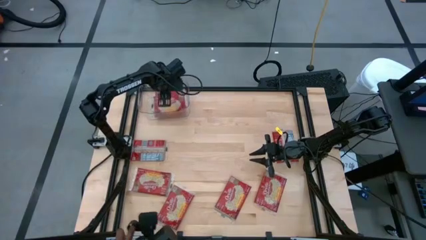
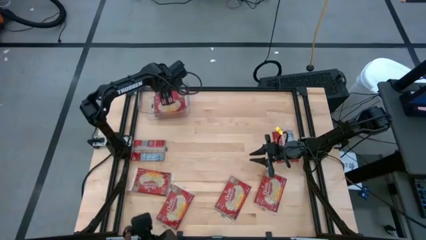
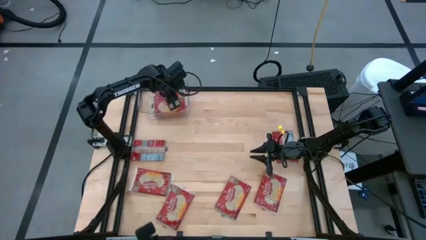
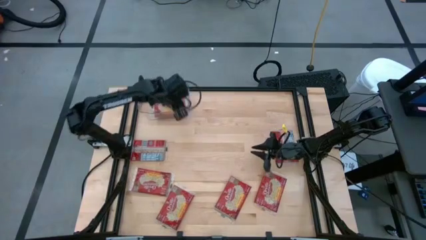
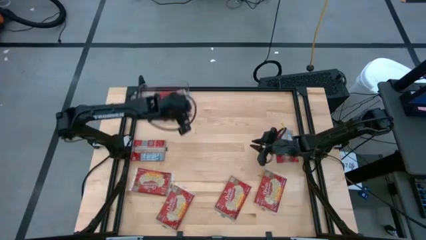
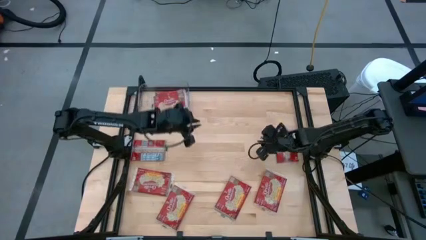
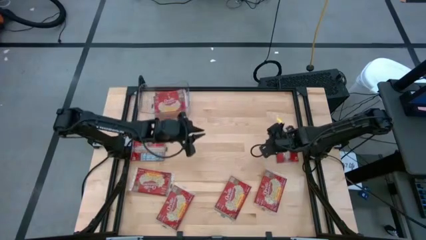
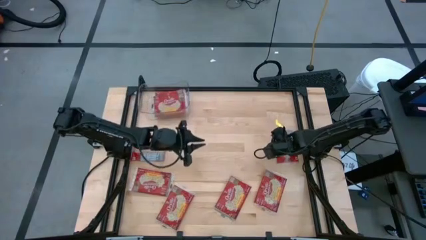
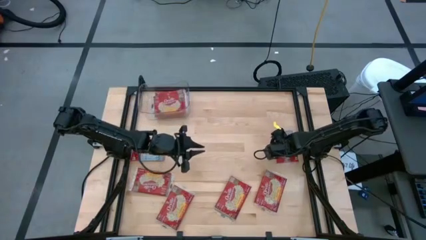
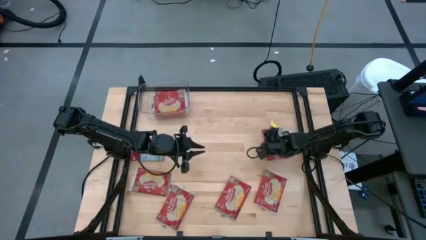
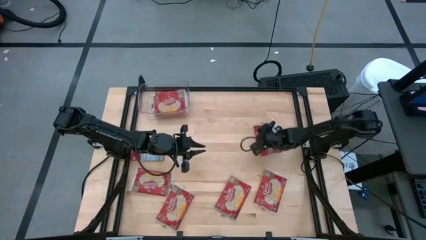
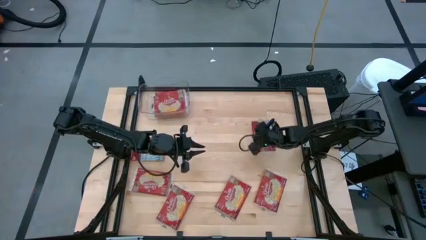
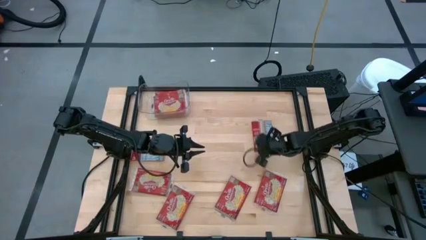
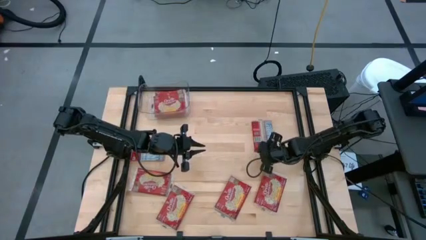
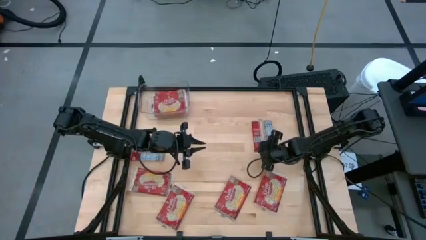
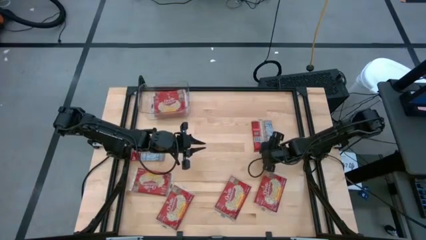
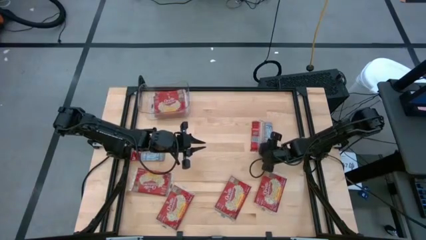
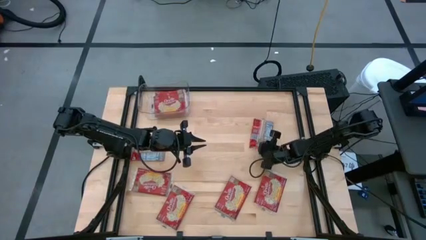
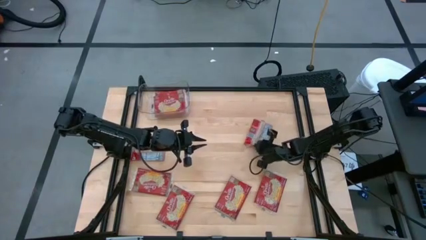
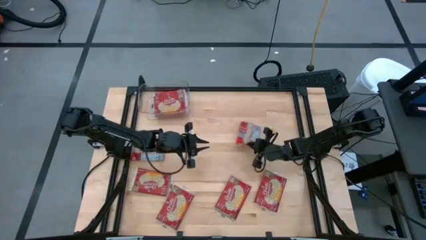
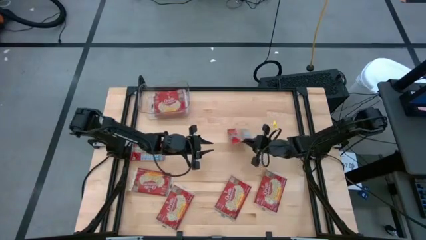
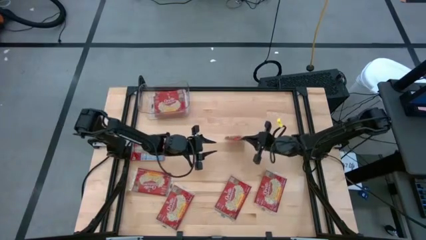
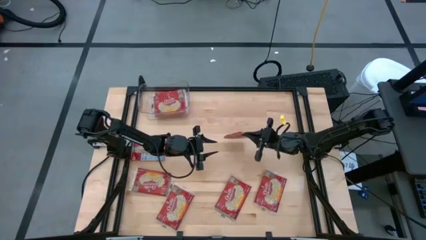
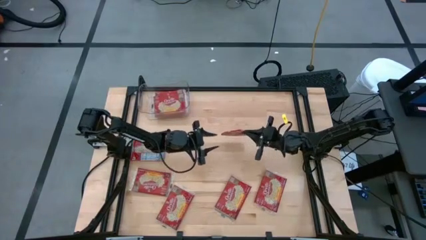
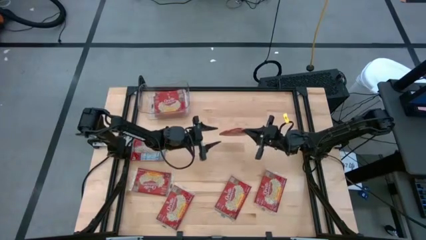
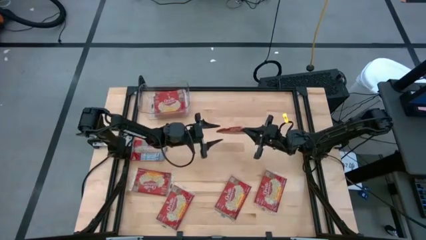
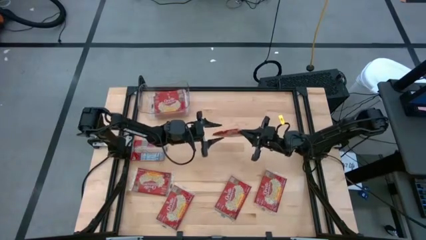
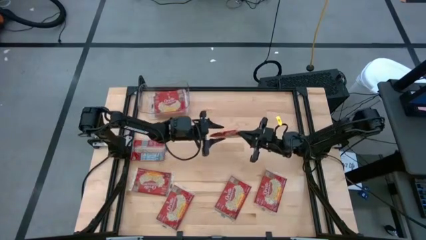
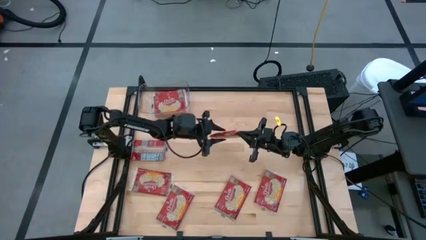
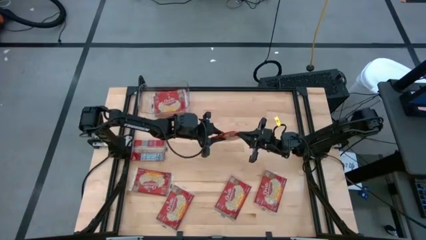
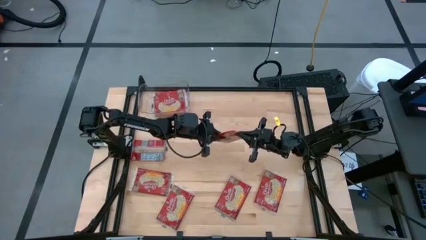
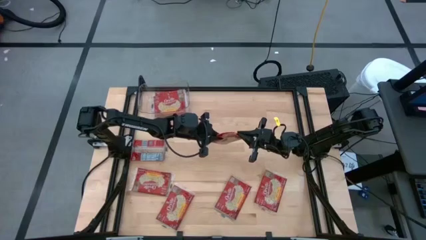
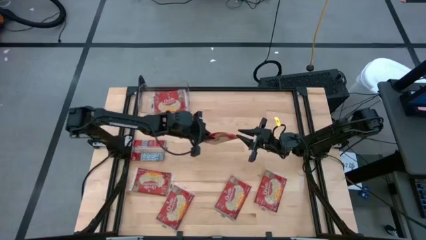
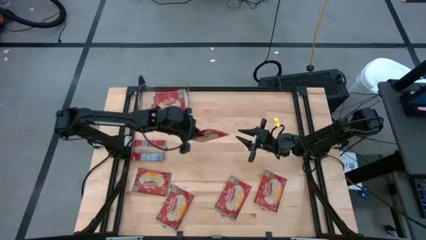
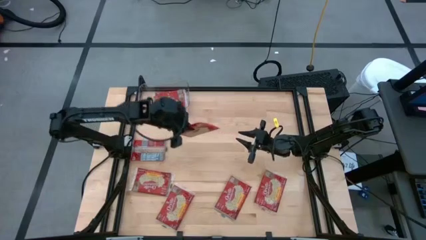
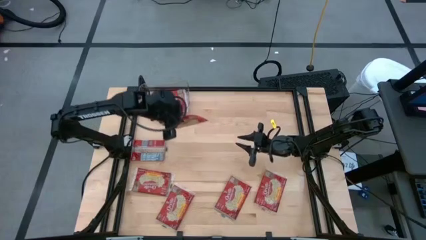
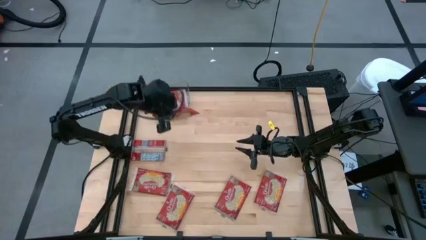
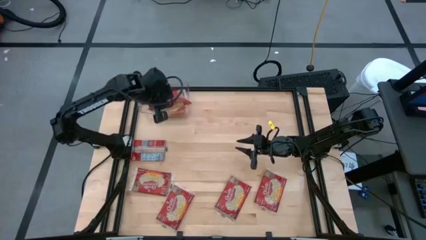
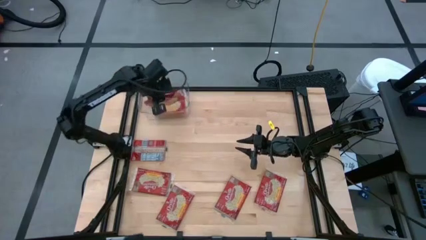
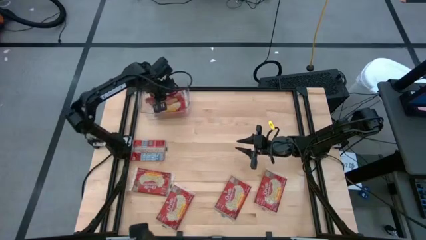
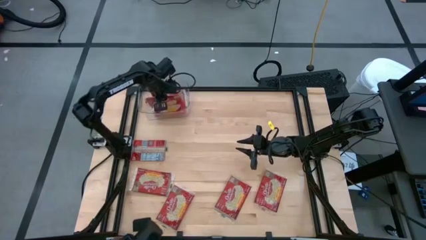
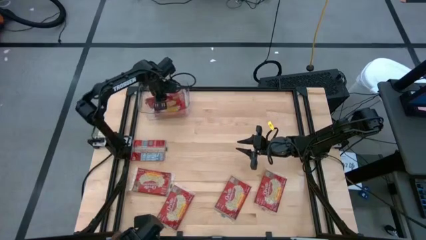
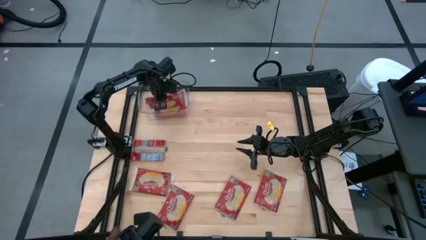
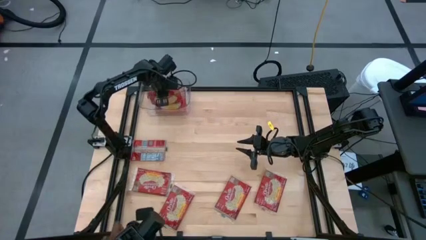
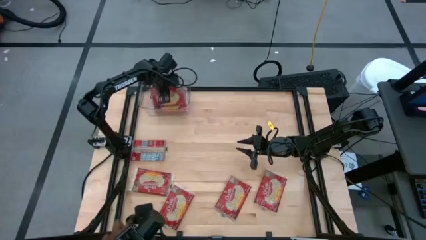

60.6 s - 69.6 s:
Task: Sort popcorn bags into baskets
Put the red popcorn bag into the transparent bin

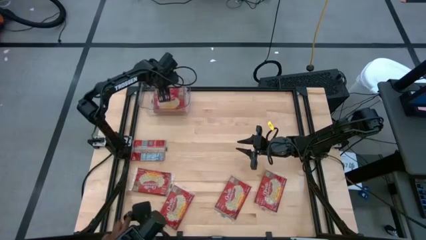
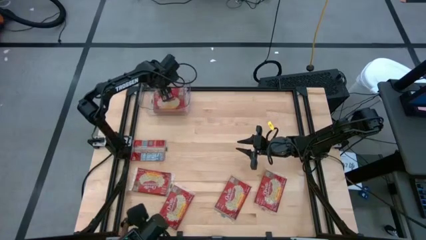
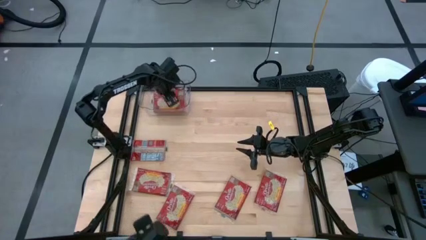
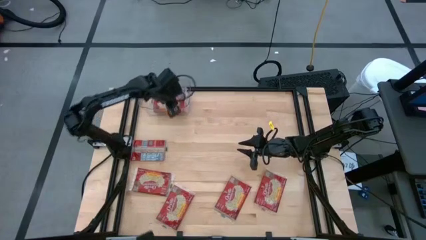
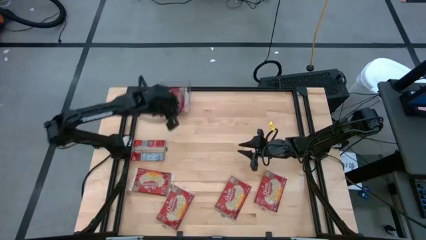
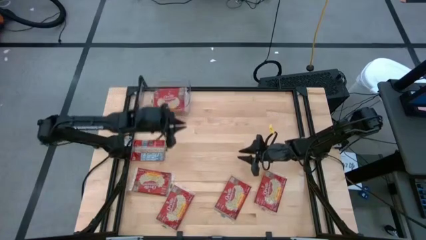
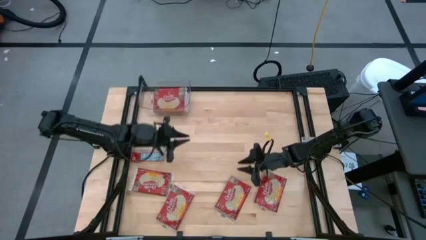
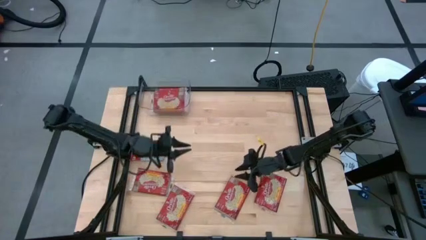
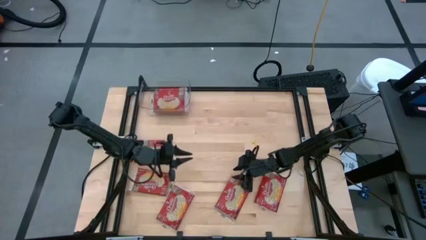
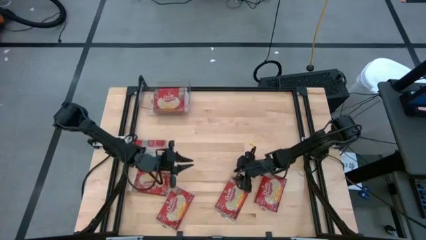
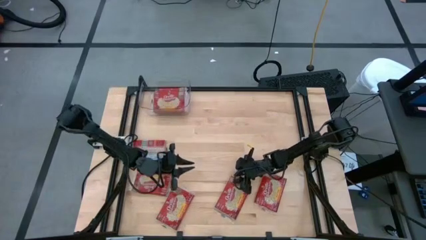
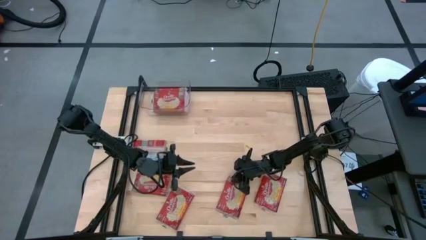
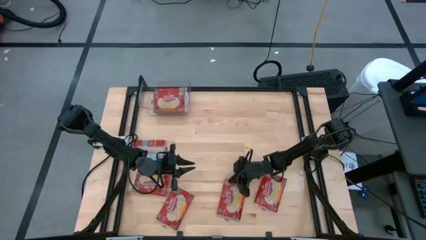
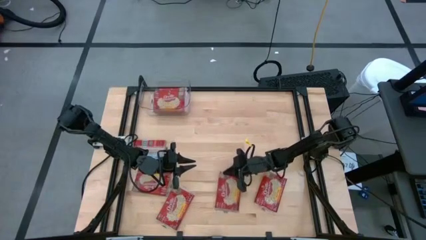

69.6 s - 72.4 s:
Put the red popcorn bag into the transparent bin

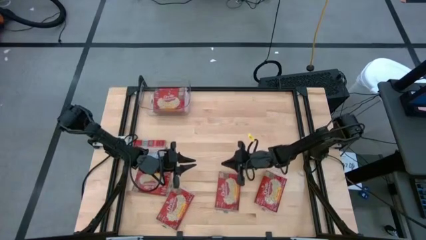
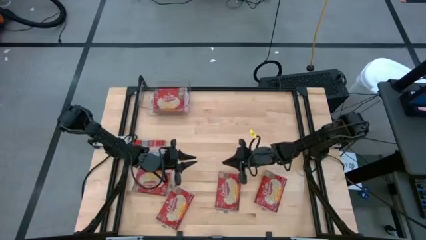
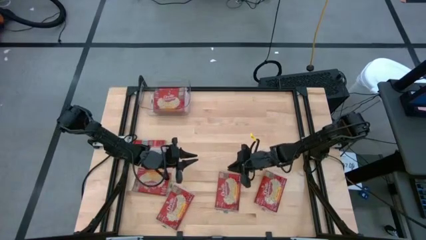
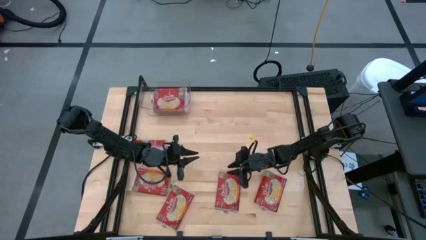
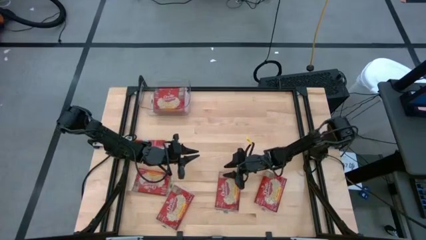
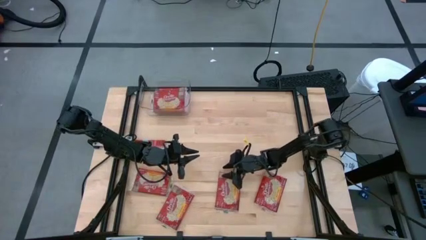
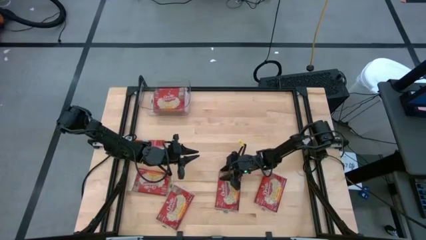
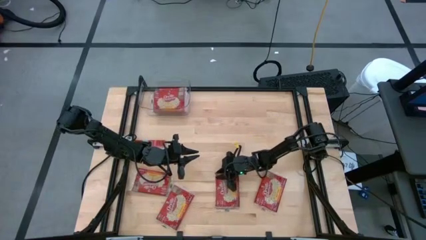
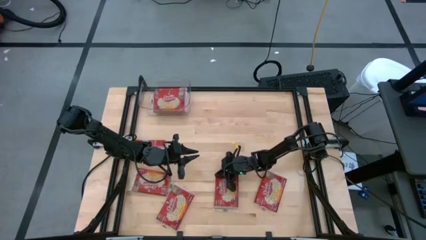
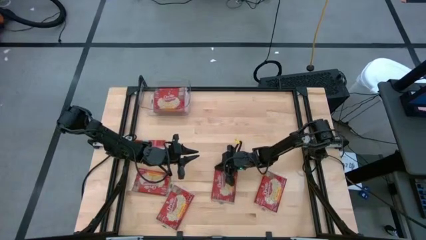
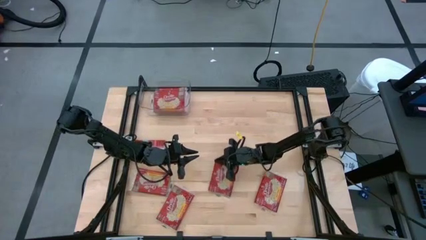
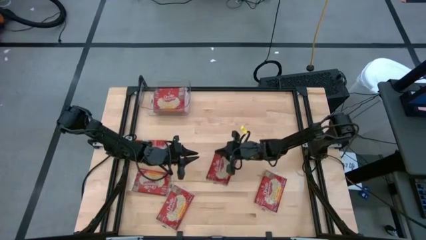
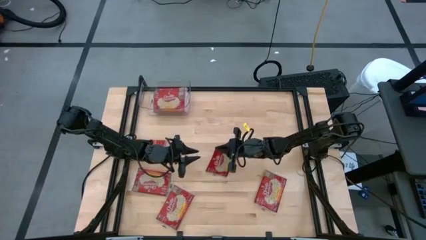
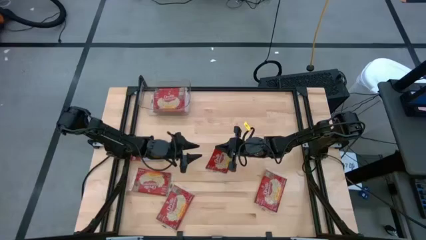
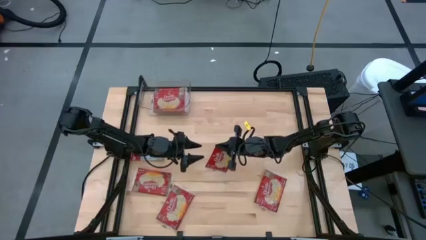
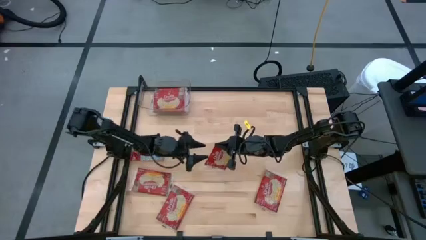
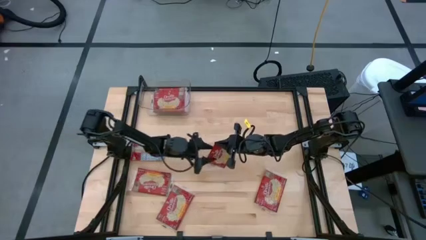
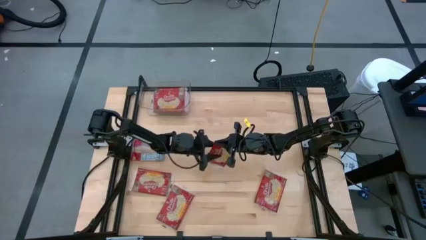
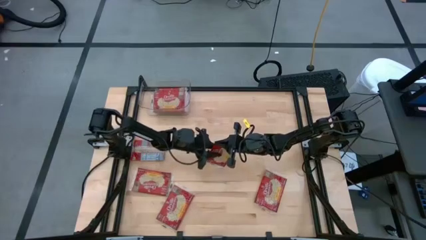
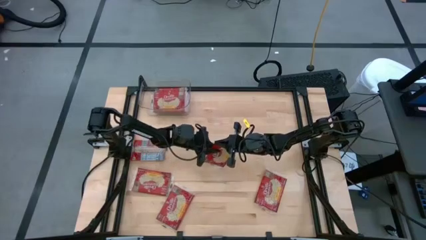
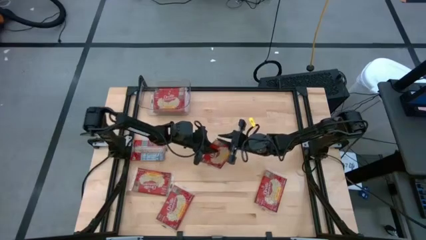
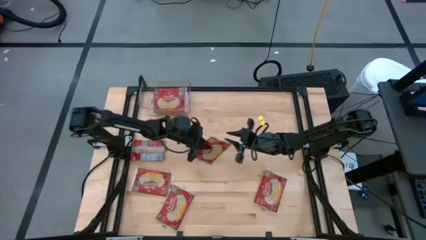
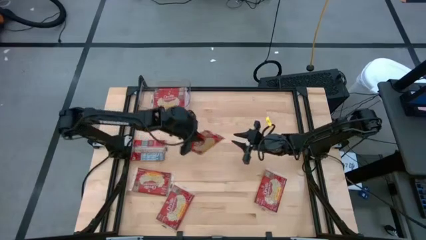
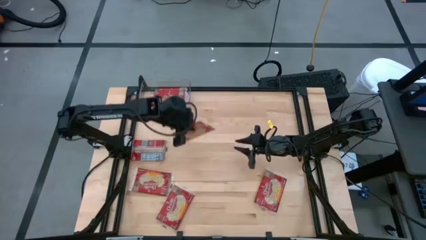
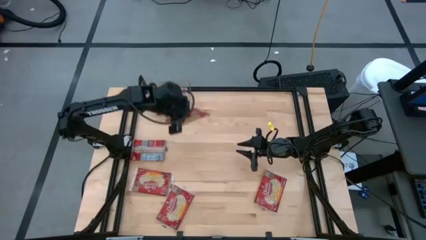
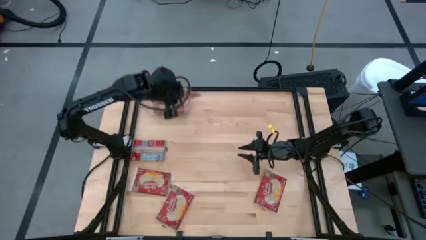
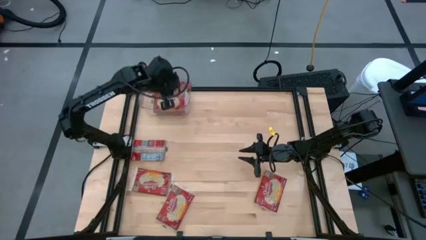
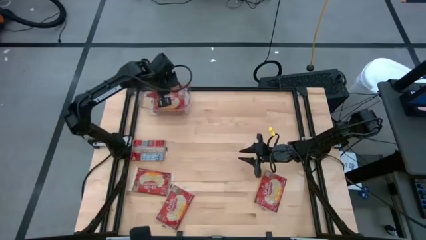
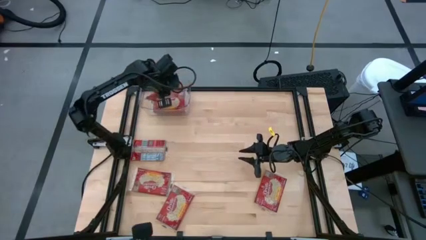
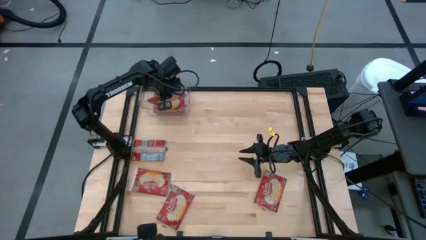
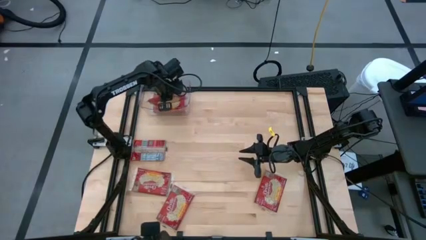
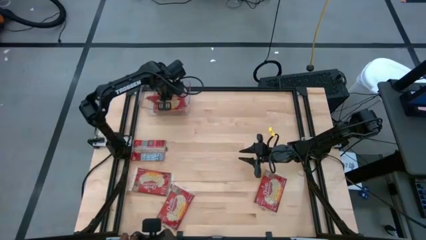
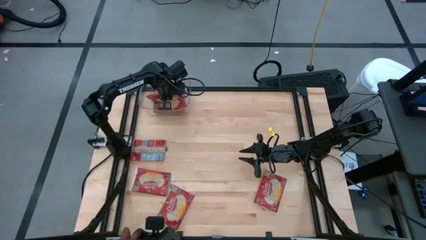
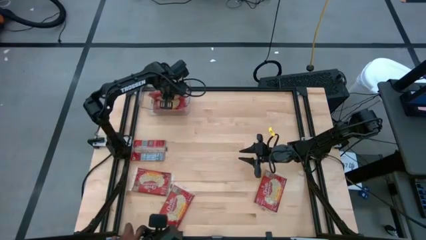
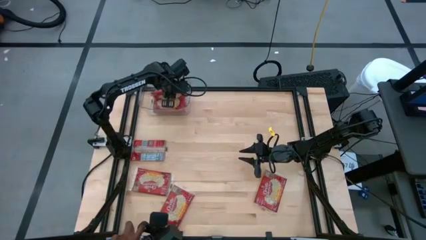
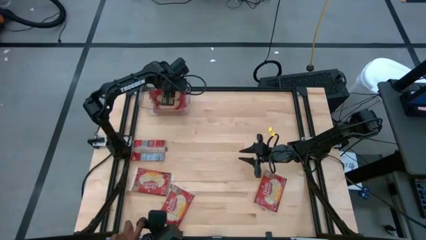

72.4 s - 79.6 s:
Put the red popcorn bag into the transparent bin
